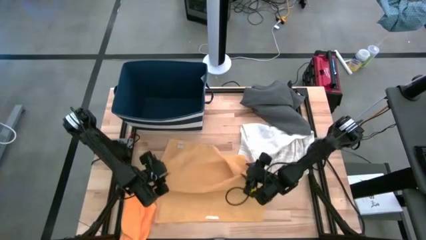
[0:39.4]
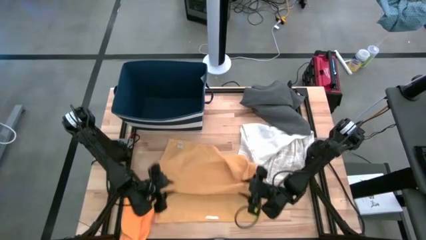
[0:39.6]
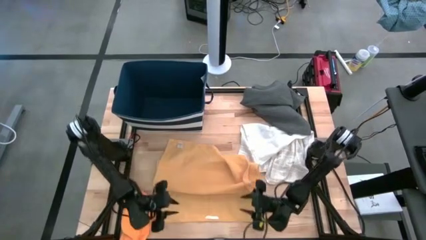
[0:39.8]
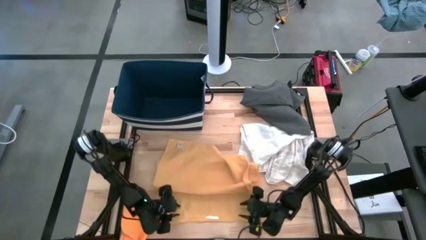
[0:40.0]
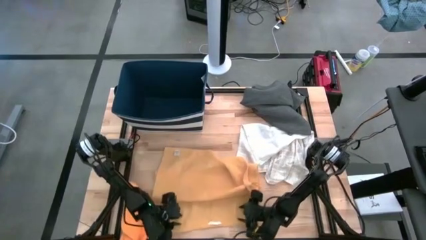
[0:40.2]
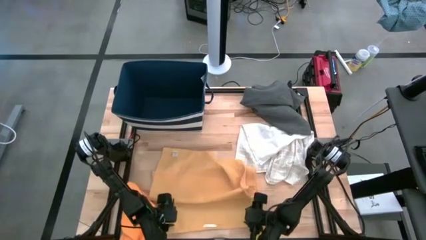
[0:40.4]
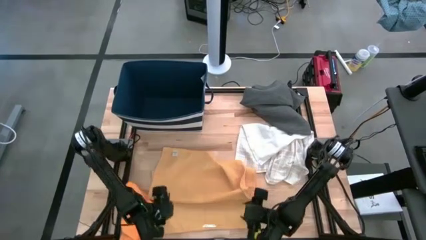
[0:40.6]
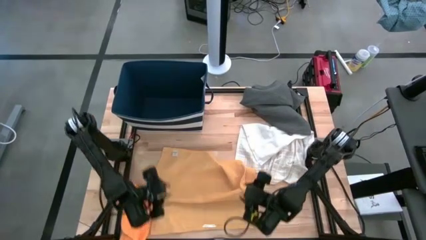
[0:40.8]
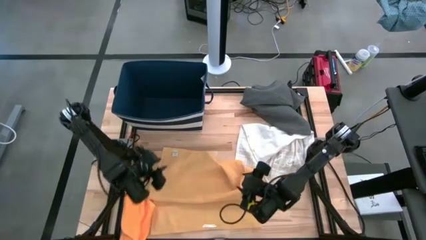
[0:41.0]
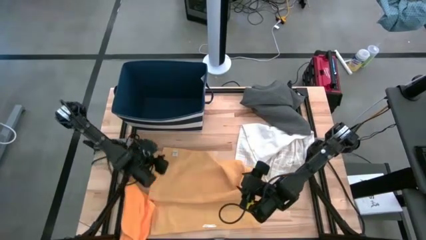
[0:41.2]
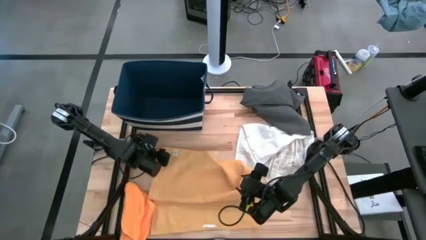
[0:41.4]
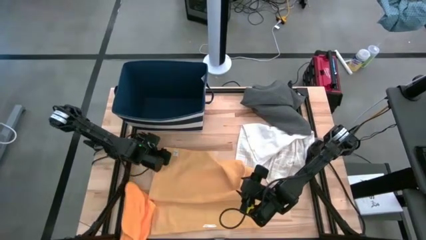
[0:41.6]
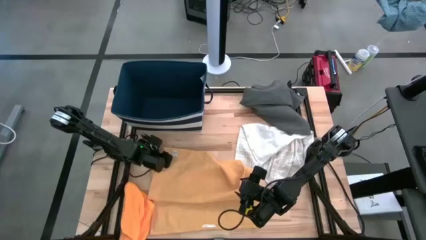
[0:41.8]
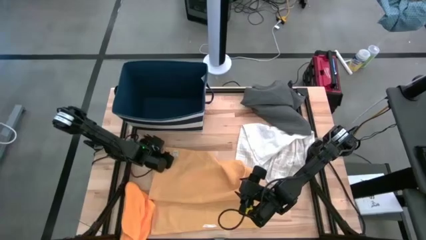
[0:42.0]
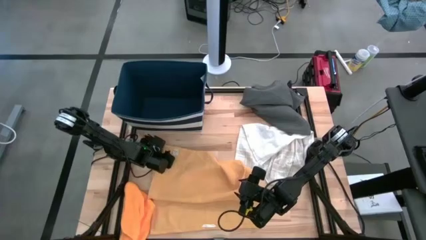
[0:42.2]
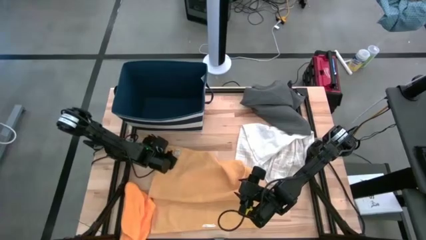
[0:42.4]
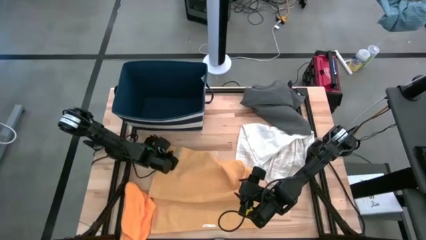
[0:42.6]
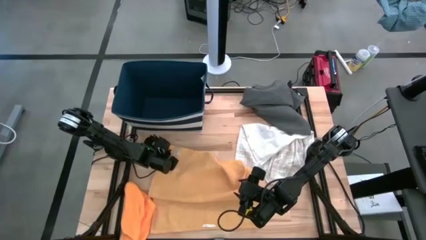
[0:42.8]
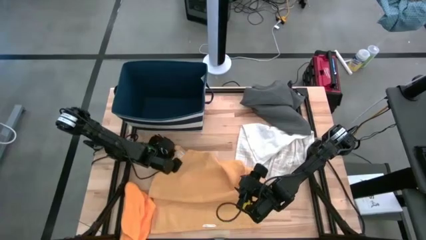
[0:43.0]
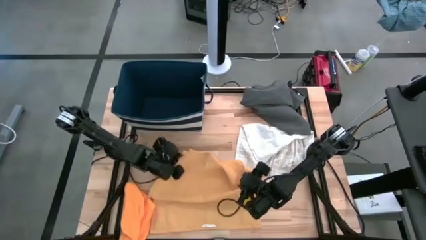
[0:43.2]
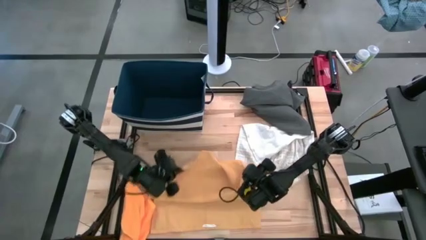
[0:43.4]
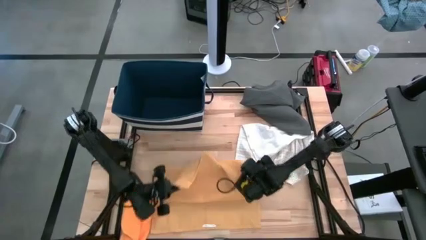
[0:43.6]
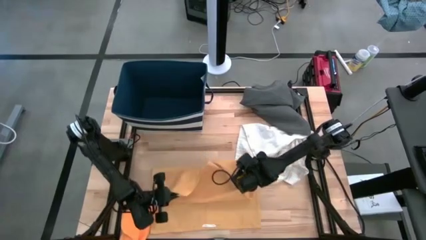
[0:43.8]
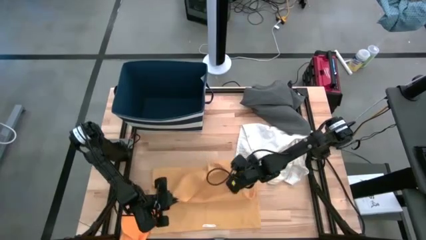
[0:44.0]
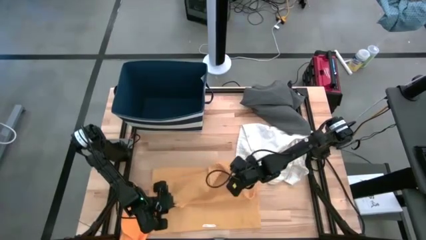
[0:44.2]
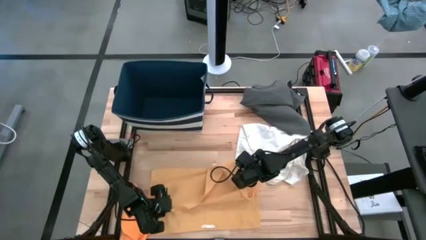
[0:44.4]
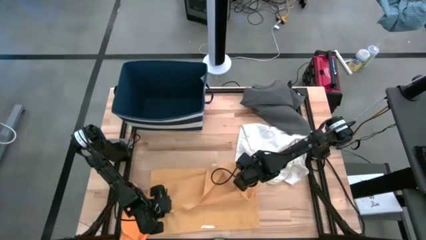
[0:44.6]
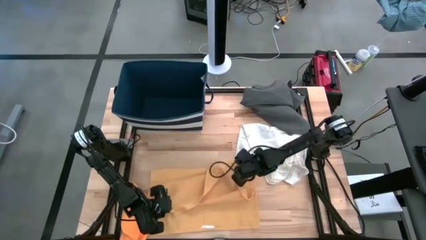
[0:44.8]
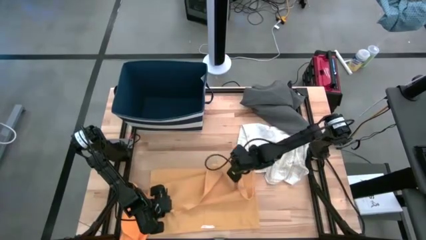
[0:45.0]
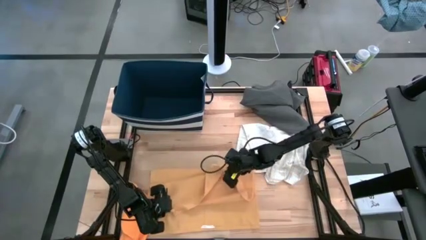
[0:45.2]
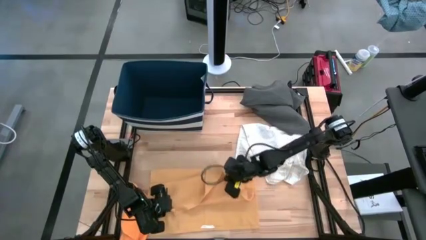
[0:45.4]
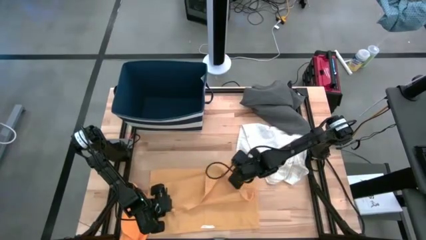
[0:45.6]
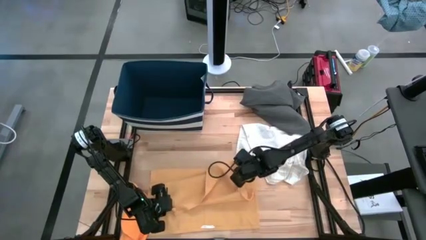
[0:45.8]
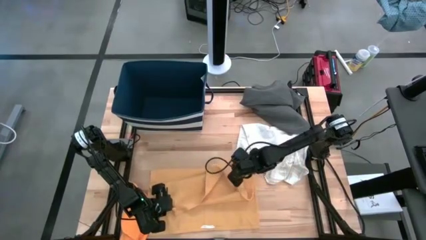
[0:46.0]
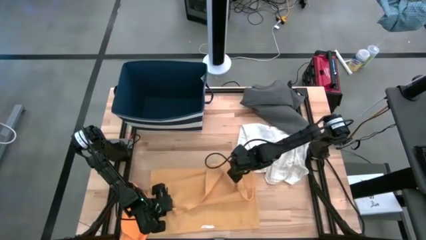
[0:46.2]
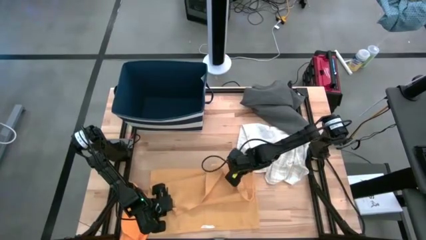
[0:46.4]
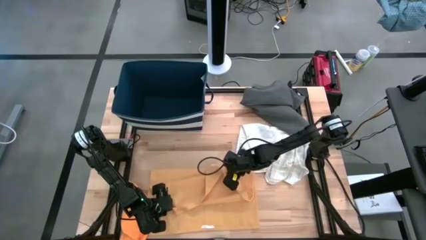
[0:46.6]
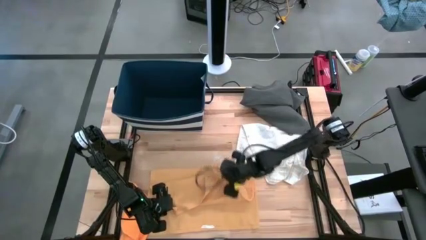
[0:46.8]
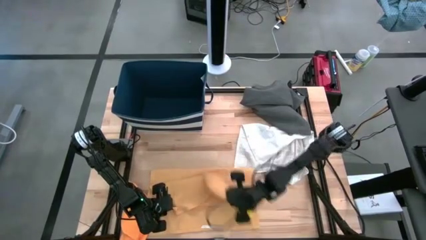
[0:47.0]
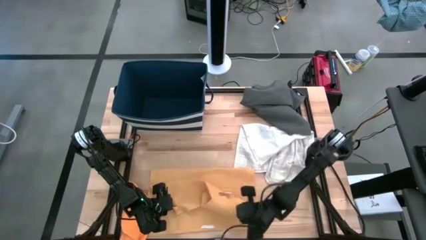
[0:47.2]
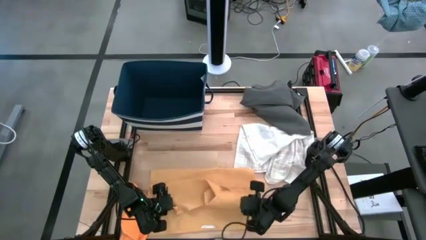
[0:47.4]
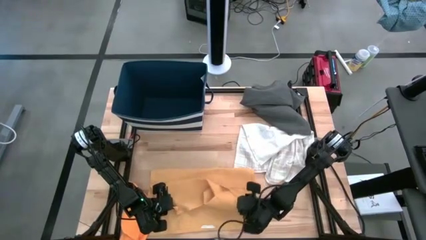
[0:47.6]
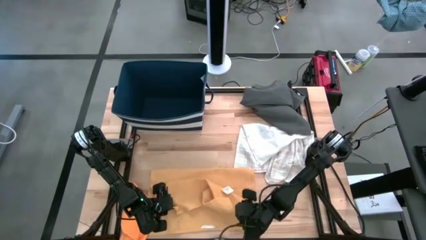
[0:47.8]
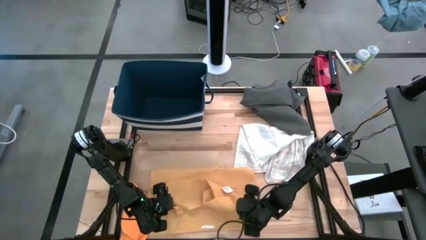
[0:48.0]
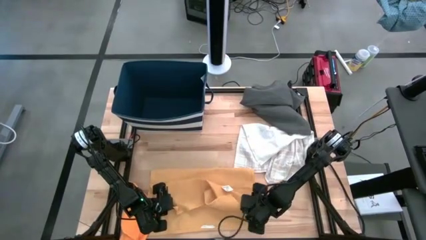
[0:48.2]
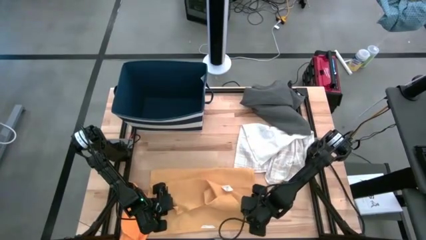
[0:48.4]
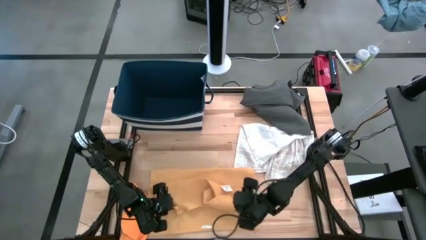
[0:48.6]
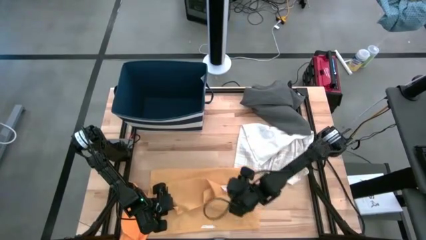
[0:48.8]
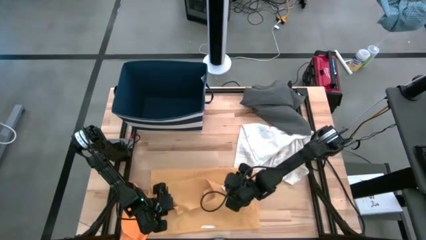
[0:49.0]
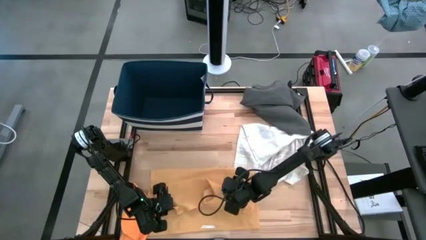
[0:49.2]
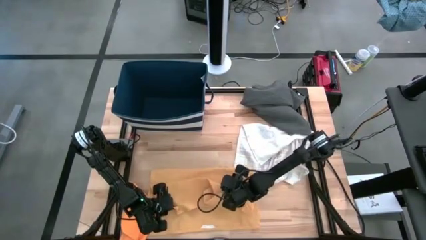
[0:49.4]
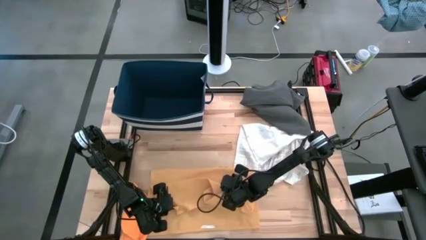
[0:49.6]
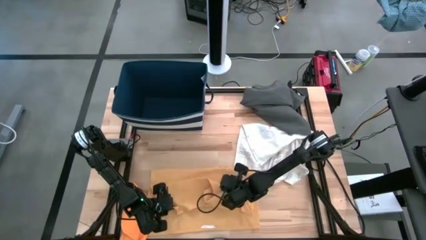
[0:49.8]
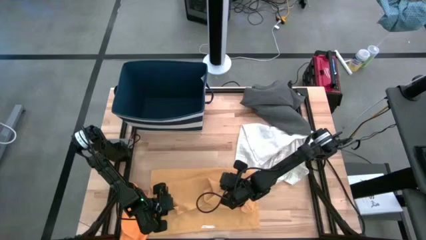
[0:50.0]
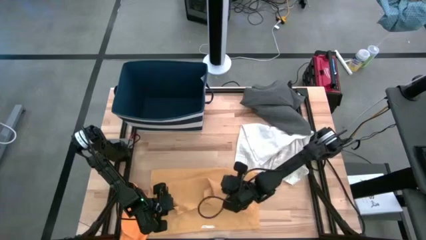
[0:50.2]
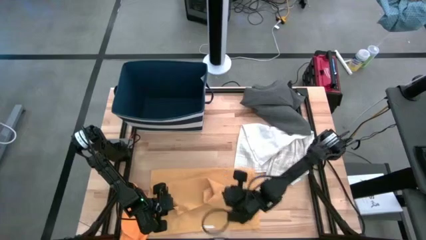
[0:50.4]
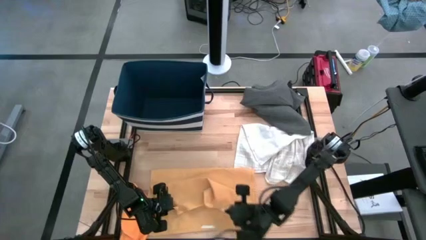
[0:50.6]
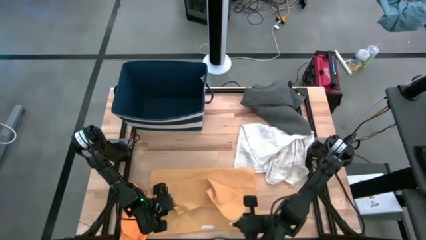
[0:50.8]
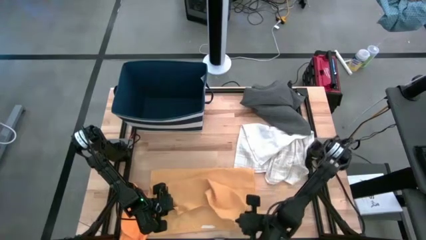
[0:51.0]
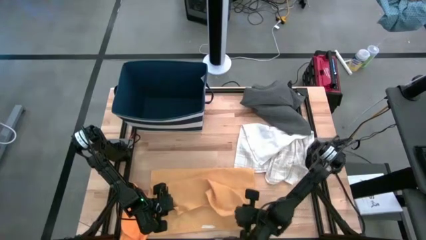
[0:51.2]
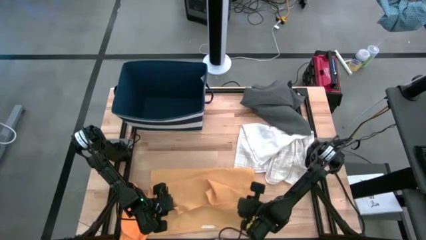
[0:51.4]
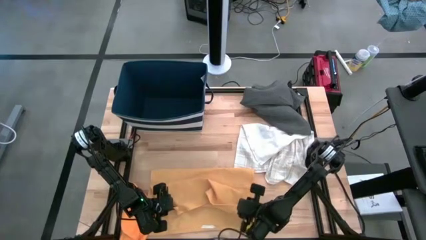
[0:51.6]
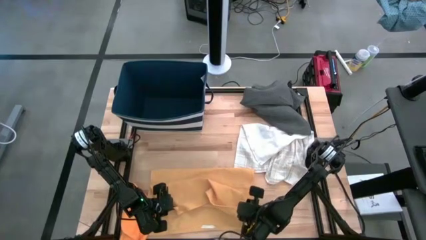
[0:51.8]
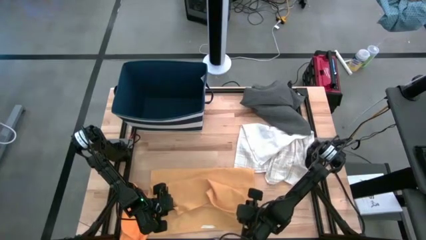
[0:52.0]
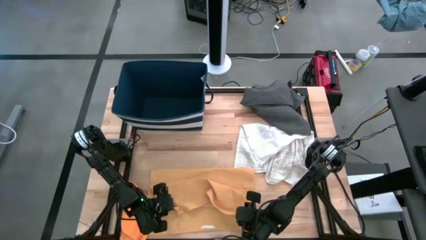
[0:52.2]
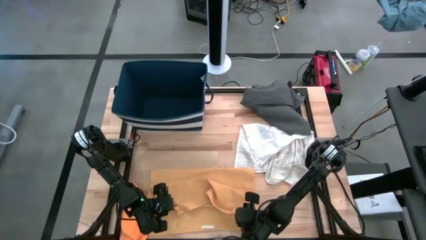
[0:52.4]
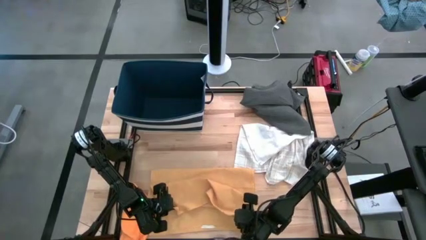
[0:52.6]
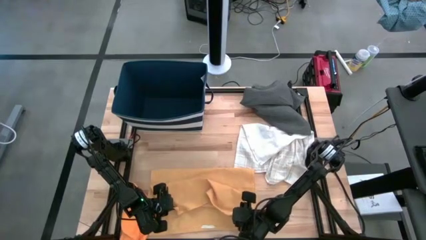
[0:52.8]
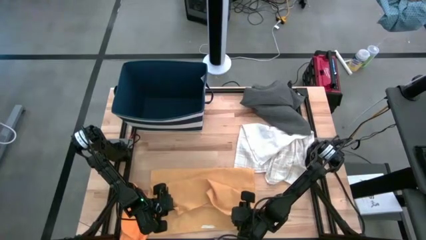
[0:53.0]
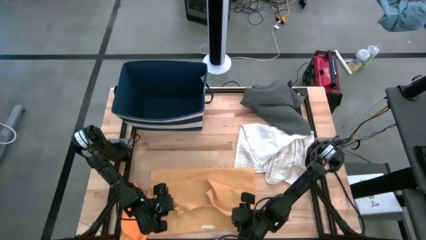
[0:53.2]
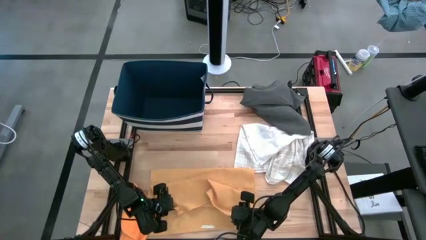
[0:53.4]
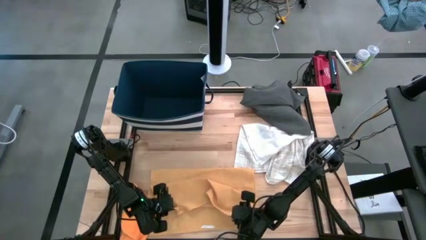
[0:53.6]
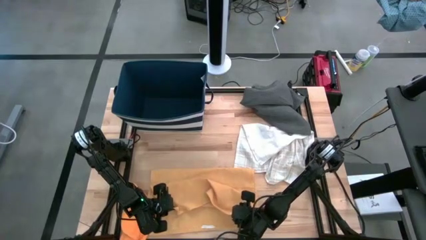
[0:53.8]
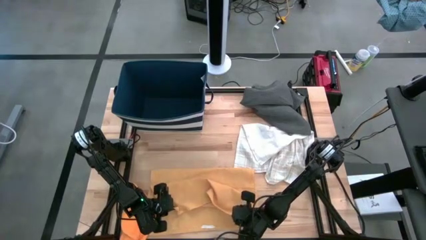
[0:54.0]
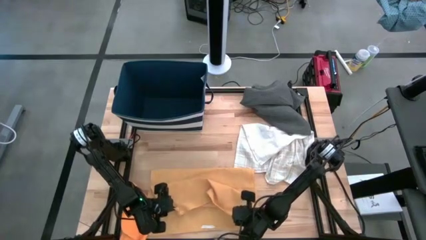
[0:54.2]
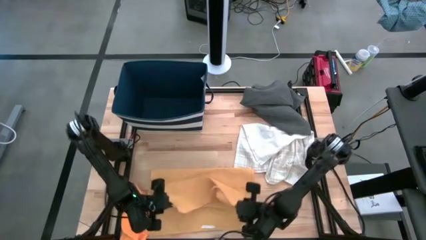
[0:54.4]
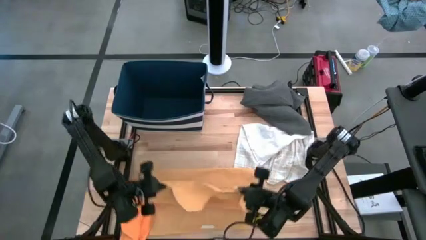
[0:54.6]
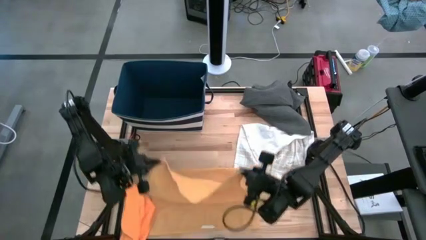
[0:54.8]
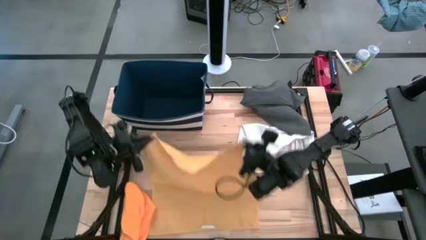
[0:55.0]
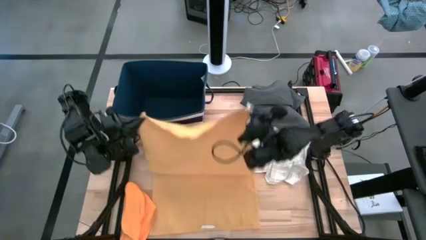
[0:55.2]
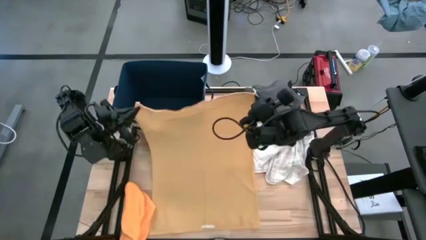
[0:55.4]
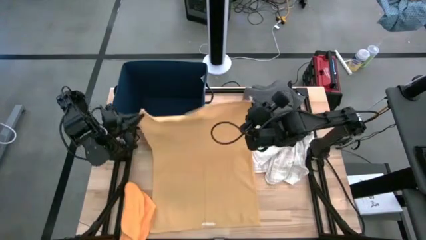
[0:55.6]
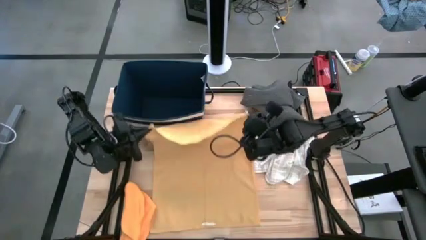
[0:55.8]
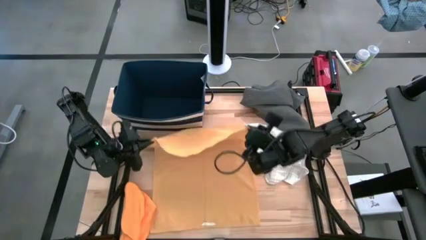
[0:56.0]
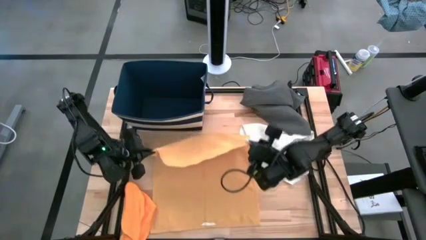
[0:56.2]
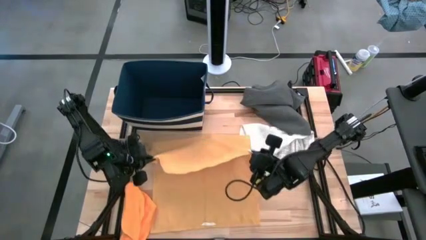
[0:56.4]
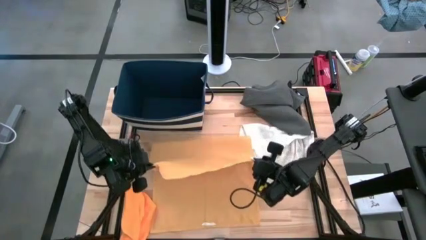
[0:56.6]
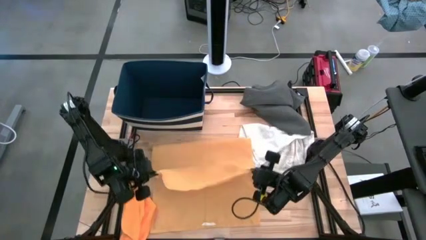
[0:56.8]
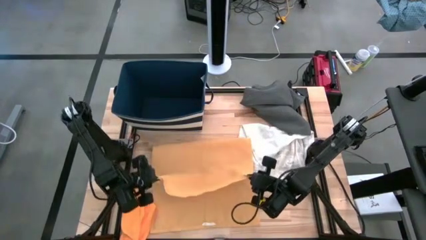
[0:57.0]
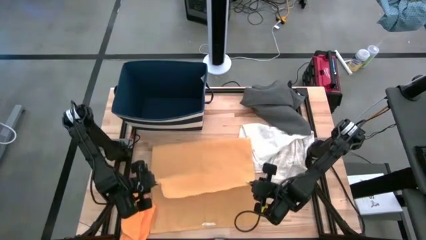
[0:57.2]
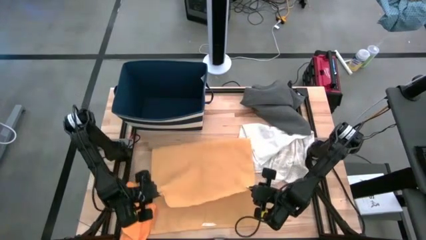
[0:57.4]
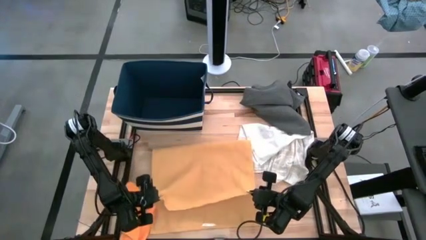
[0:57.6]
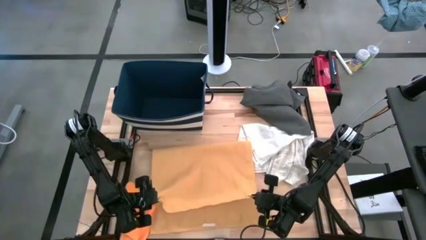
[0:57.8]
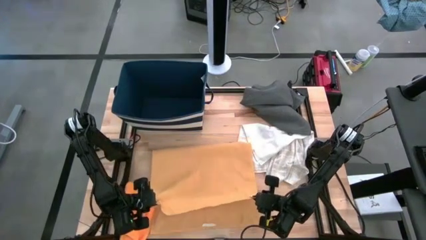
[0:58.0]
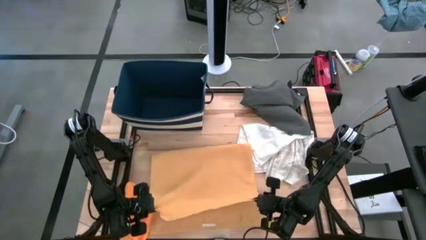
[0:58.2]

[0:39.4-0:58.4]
Task: Fold towel
Fold the yellow kitchen towel
